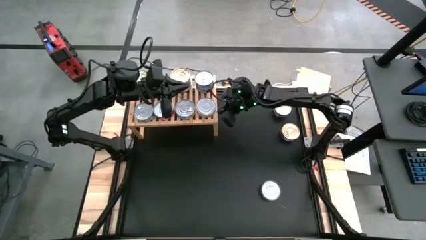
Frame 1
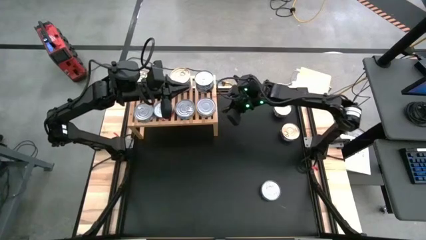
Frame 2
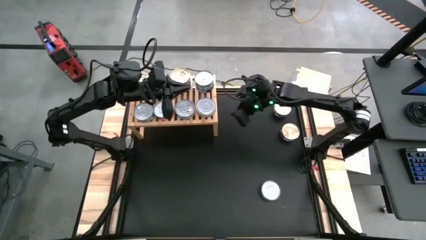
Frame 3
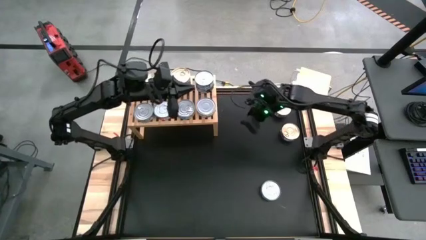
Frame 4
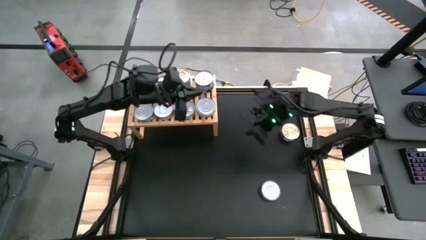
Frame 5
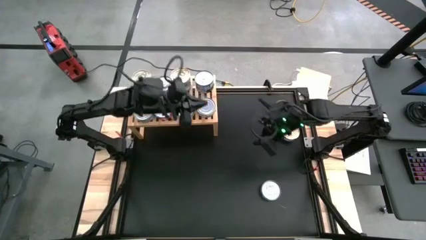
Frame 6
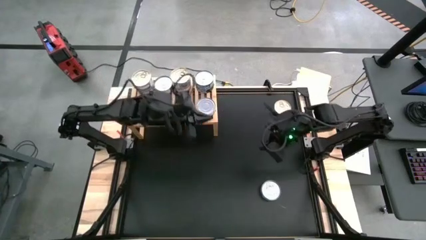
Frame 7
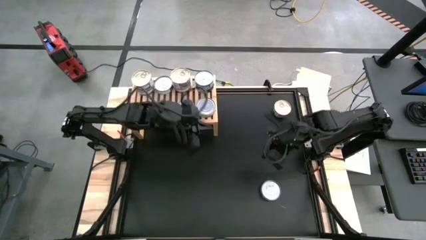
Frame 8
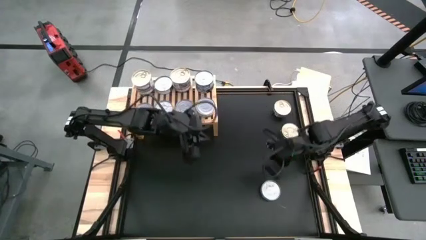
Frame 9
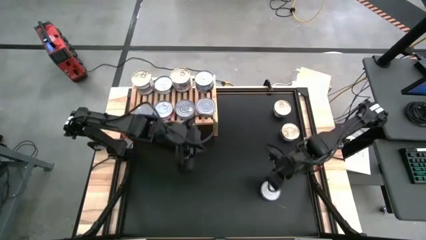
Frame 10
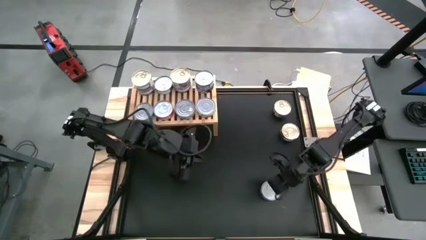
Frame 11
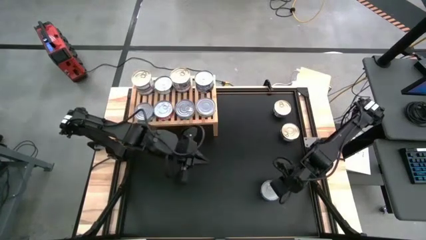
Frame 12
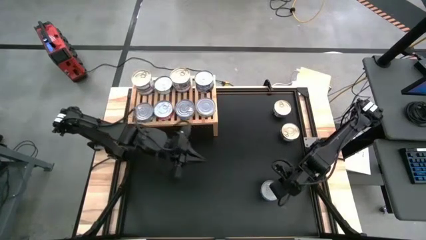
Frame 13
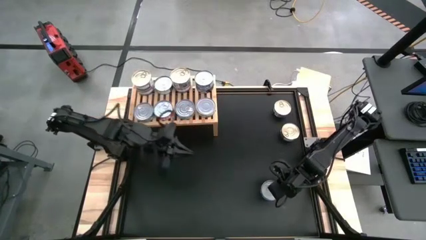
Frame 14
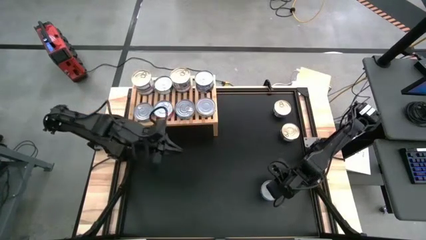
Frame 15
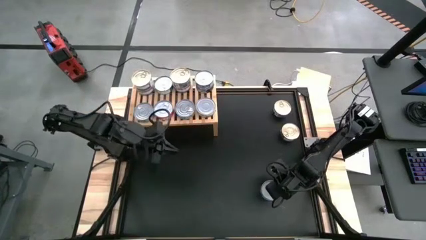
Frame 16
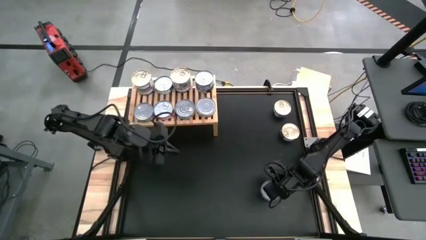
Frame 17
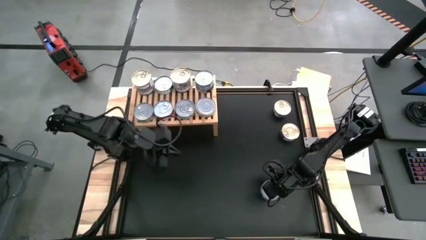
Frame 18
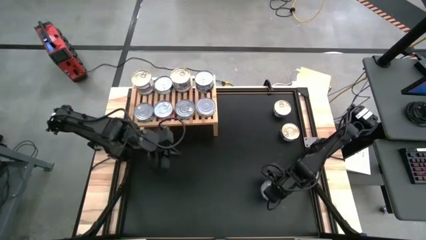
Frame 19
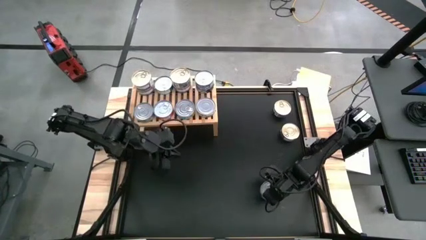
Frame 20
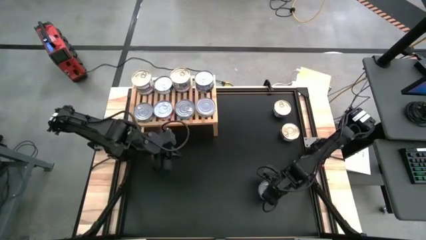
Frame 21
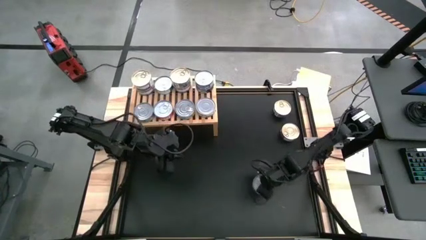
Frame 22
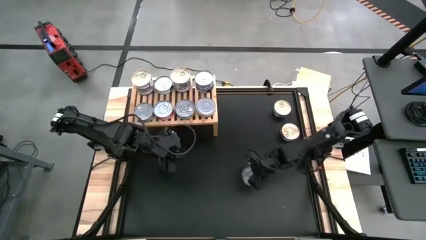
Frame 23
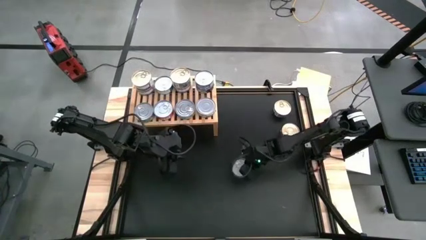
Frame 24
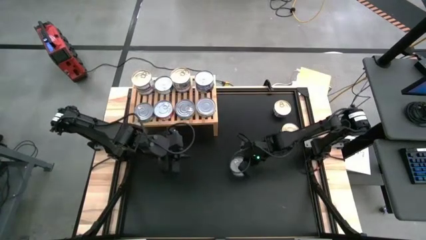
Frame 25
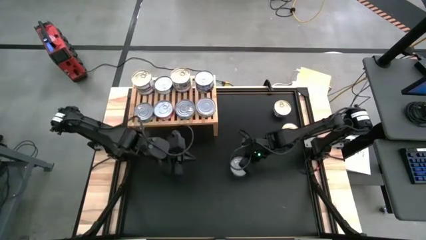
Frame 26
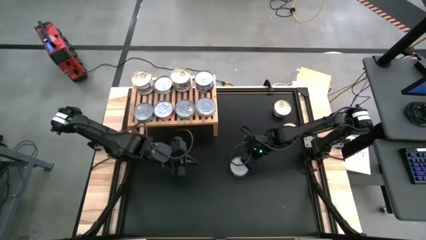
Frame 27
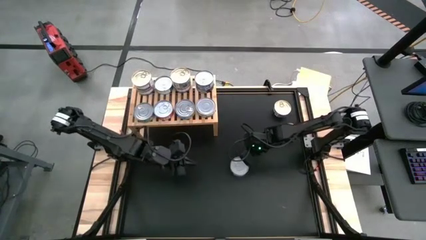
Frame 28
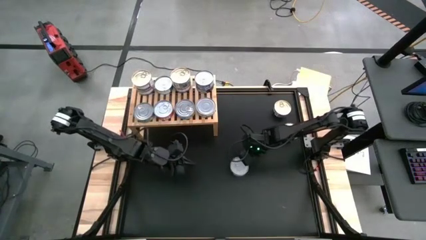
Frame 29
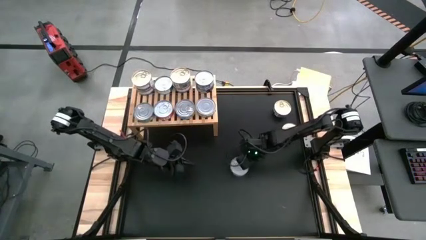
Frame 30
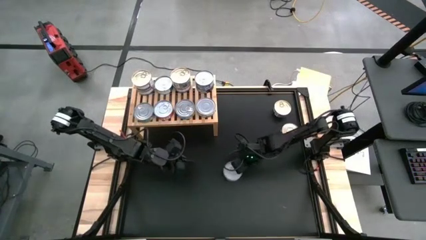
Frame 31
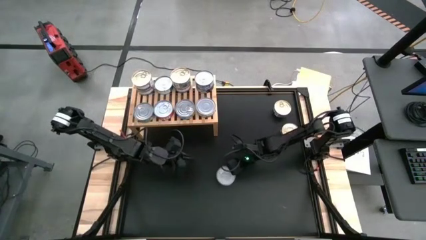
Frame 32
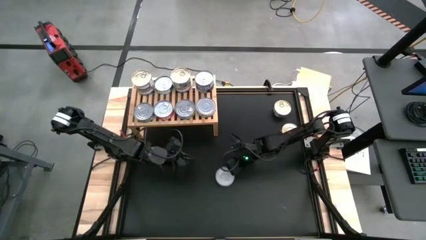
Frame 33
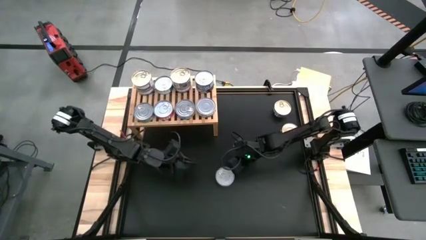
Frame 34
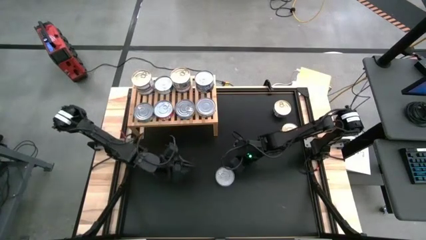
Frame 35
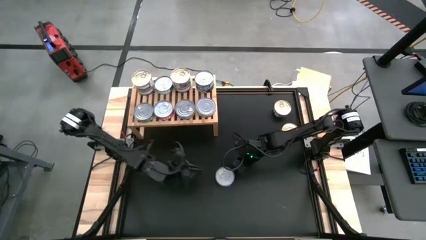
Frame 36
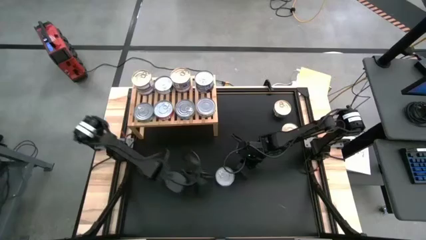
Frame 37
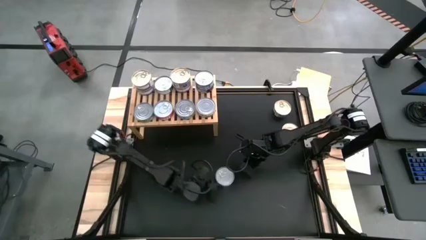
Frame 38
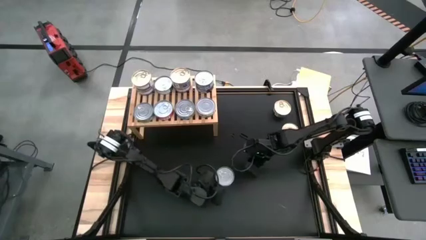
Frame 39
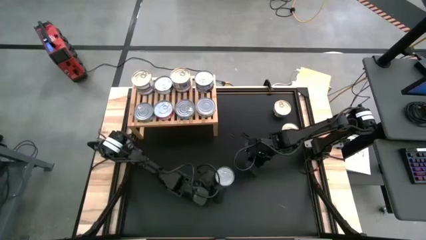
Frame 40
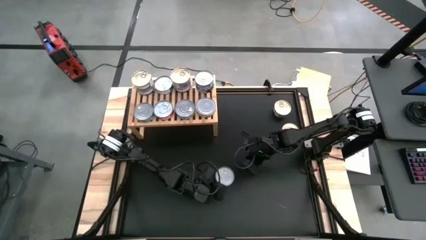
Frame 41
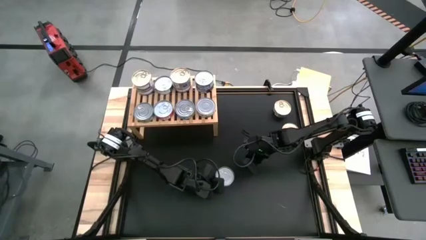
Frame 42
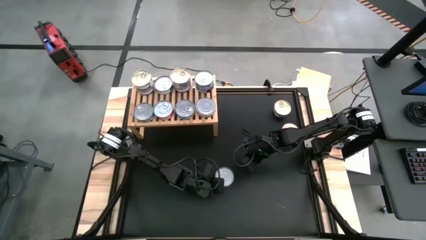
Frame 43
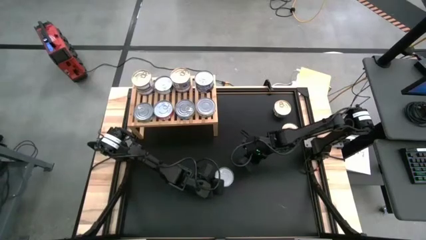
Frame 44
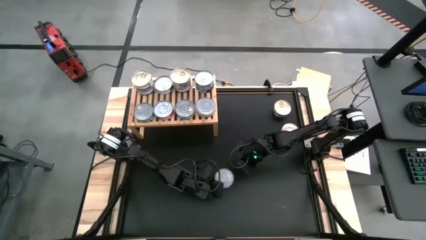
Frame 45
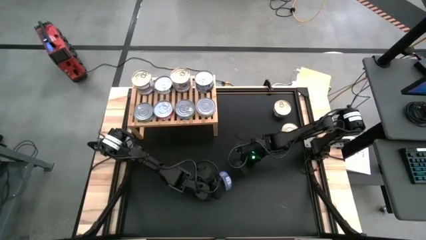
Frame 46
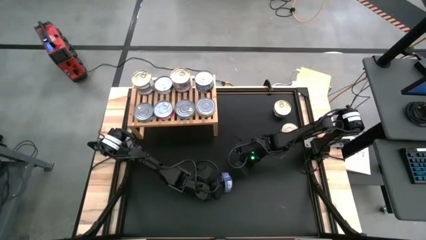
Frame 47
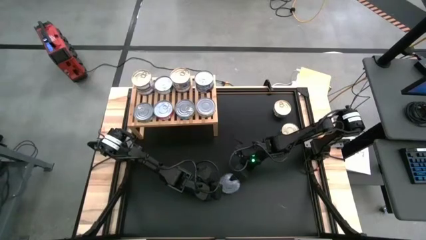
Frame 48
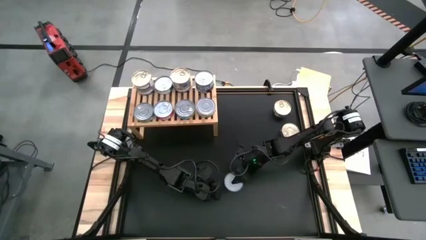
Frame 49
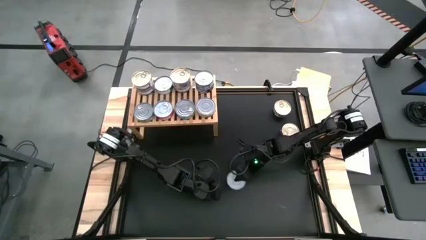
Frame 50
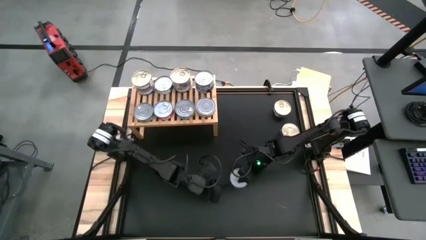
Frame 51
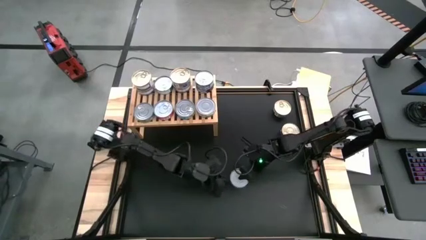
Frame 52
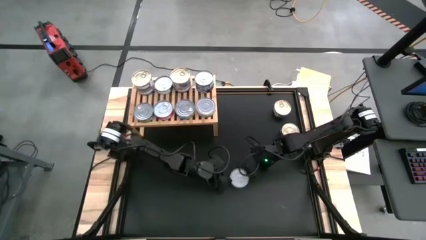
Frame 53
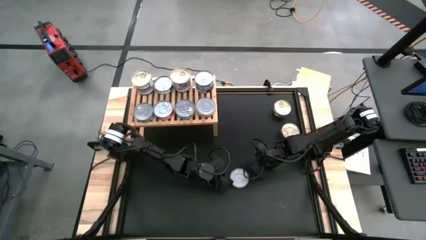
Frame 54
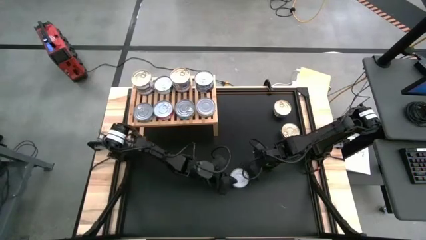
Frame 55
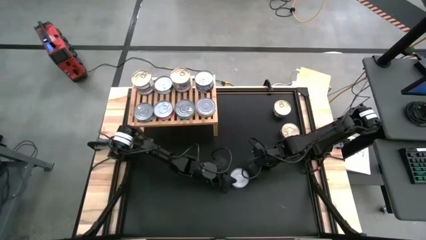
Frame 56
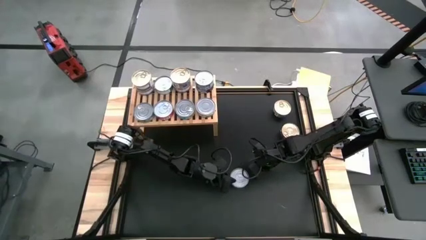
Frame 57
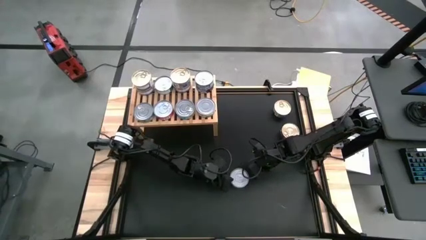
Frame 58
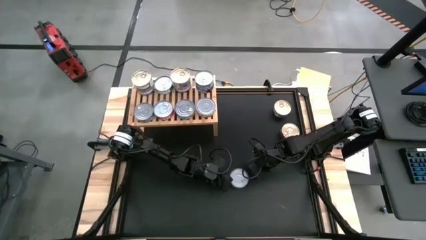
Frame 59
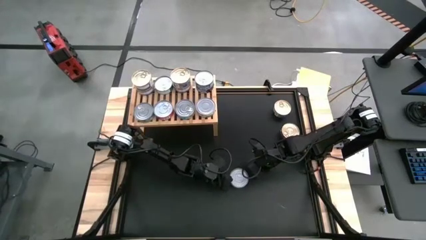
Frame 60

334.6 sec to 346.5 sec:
Task: Stack canned seafood by type on shelf
Stack the blue tuna can on top of the other blue tuna cans on the shelf
